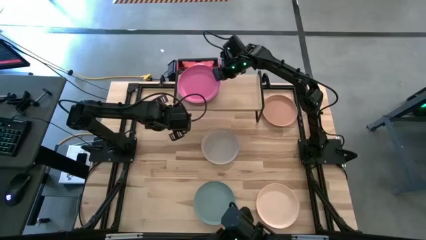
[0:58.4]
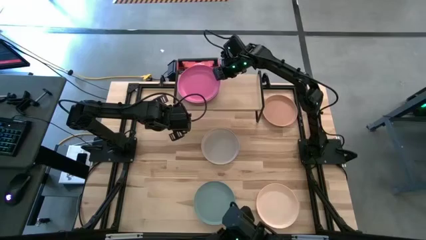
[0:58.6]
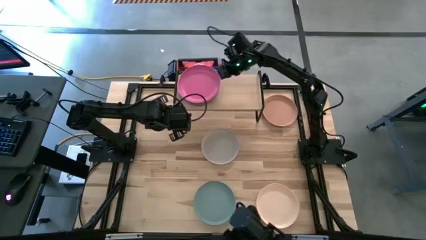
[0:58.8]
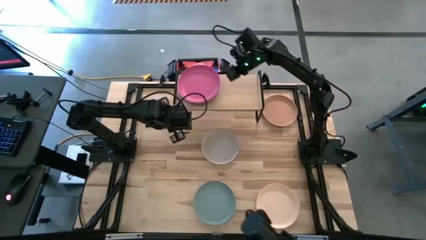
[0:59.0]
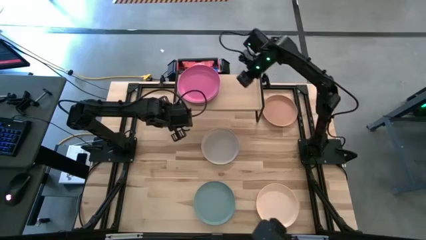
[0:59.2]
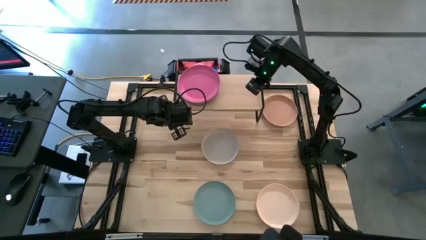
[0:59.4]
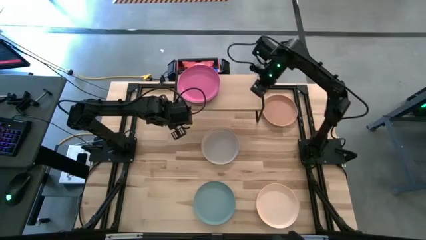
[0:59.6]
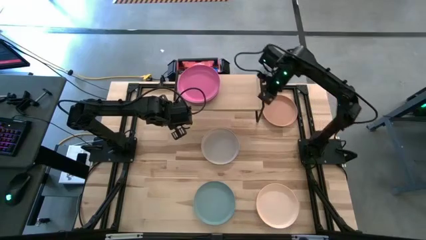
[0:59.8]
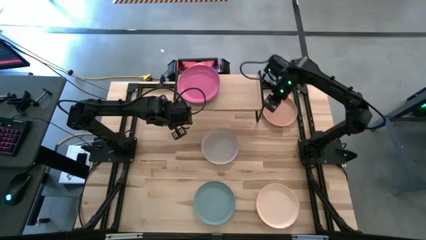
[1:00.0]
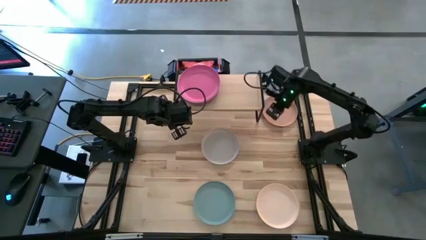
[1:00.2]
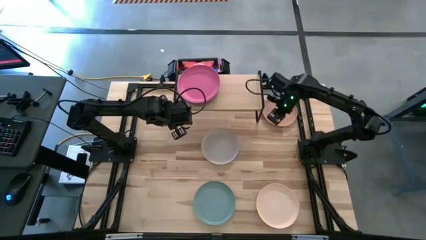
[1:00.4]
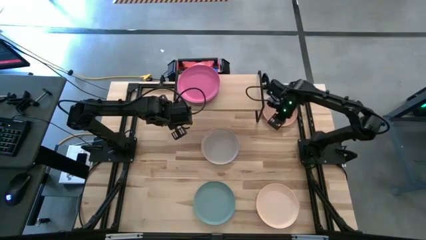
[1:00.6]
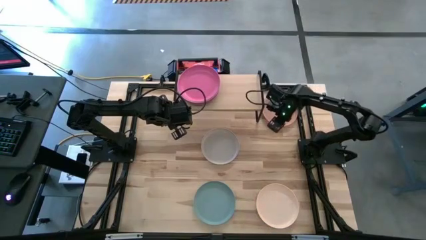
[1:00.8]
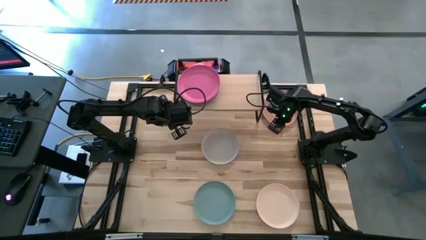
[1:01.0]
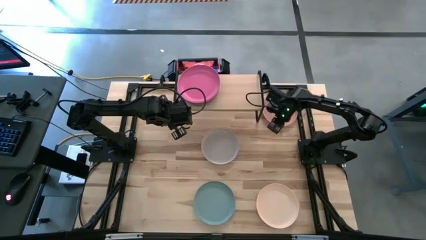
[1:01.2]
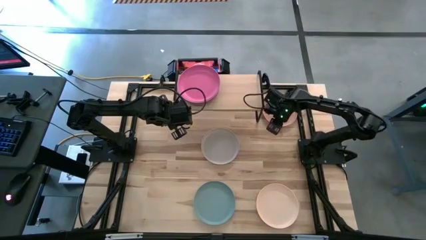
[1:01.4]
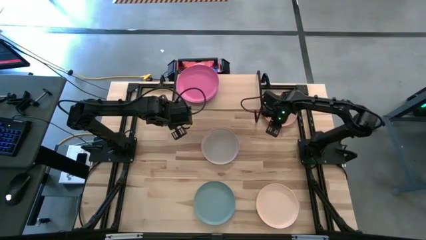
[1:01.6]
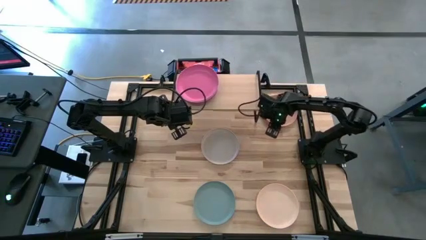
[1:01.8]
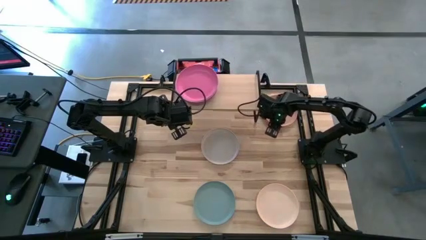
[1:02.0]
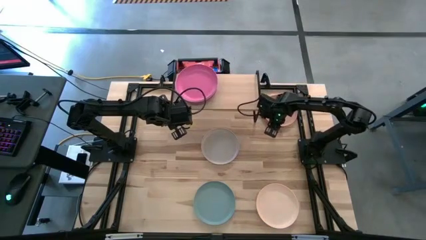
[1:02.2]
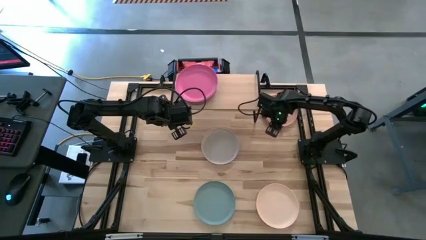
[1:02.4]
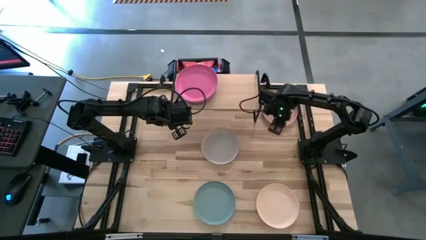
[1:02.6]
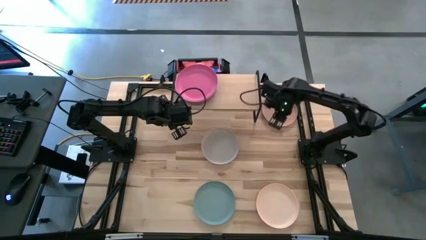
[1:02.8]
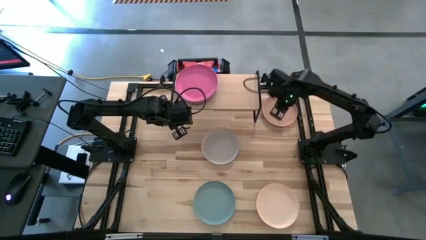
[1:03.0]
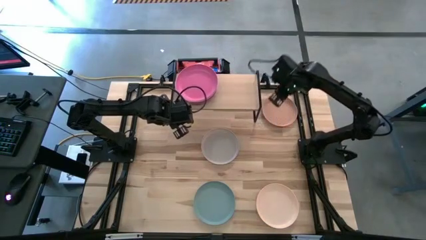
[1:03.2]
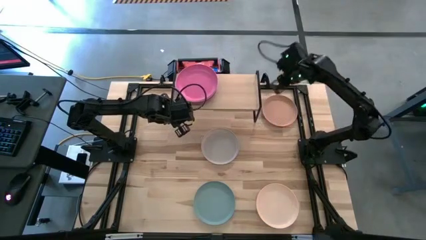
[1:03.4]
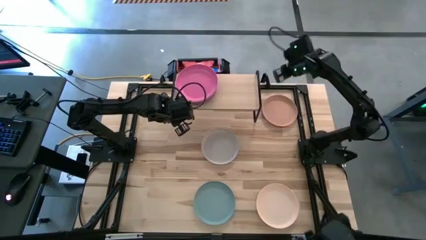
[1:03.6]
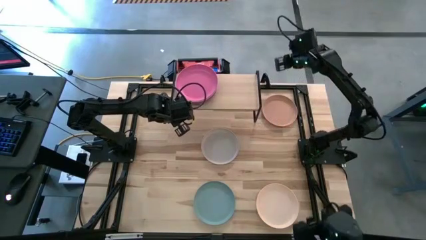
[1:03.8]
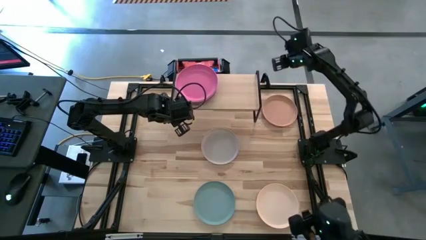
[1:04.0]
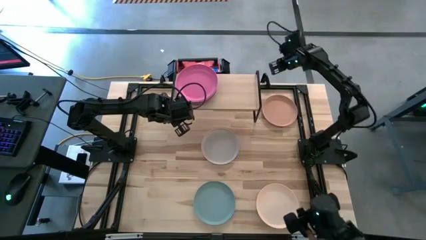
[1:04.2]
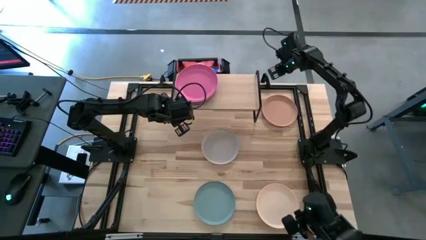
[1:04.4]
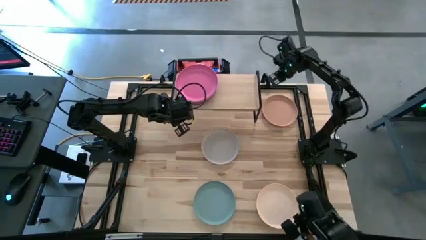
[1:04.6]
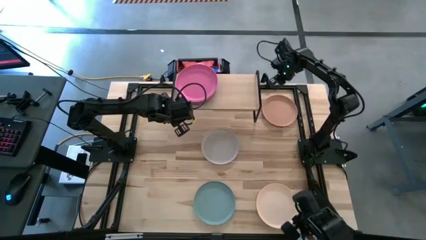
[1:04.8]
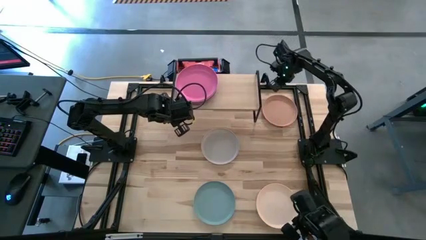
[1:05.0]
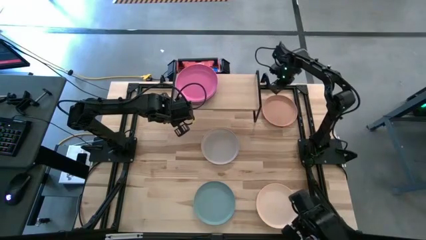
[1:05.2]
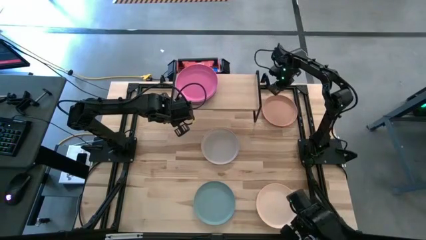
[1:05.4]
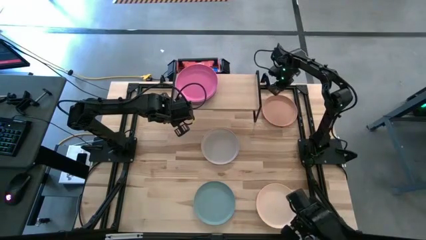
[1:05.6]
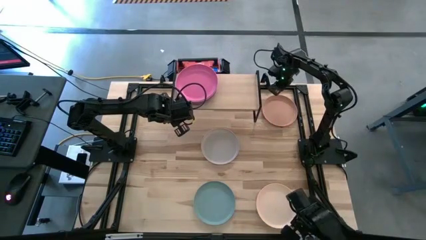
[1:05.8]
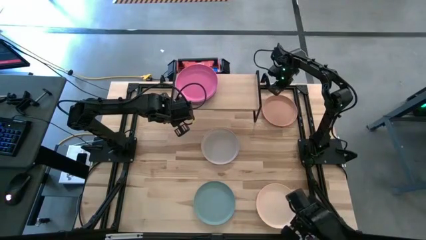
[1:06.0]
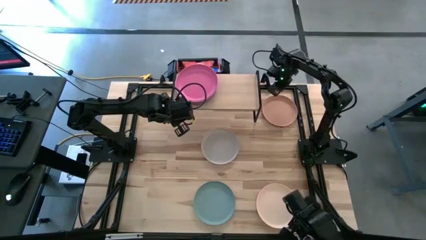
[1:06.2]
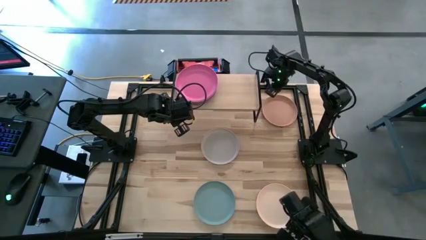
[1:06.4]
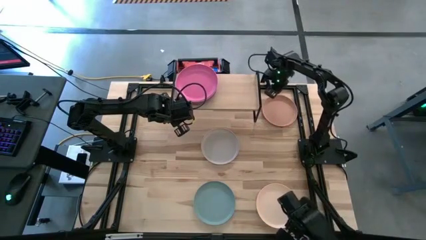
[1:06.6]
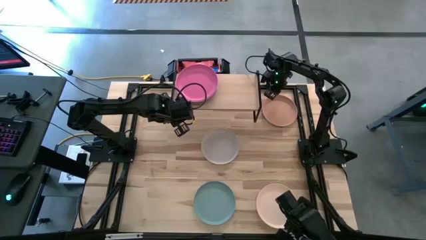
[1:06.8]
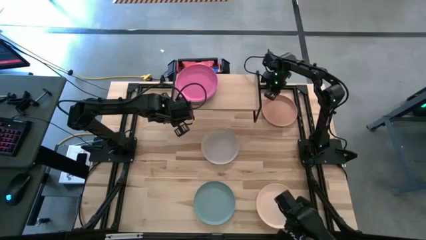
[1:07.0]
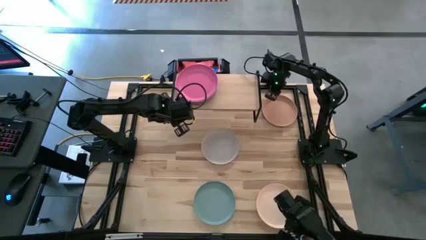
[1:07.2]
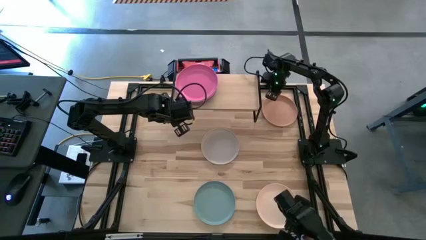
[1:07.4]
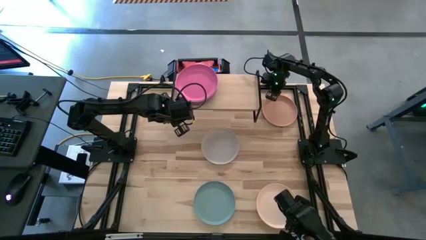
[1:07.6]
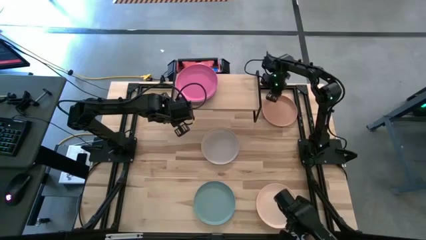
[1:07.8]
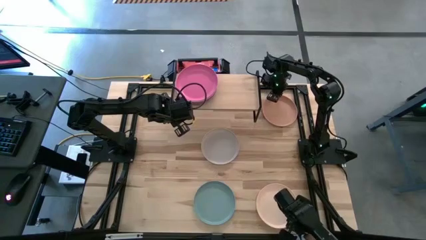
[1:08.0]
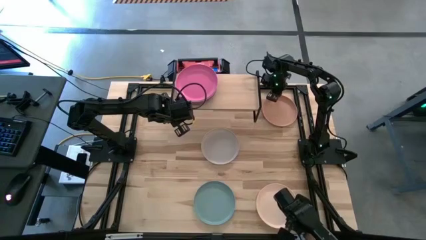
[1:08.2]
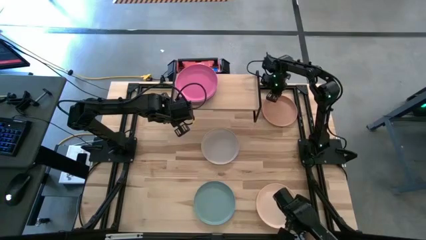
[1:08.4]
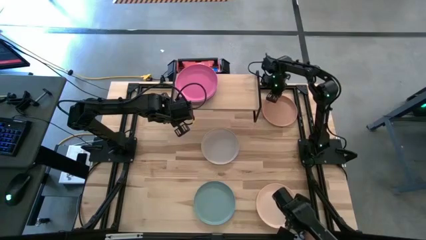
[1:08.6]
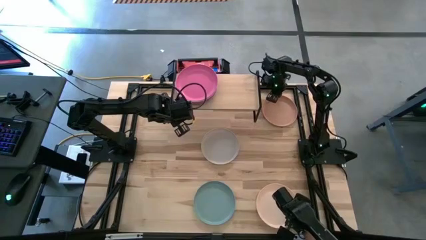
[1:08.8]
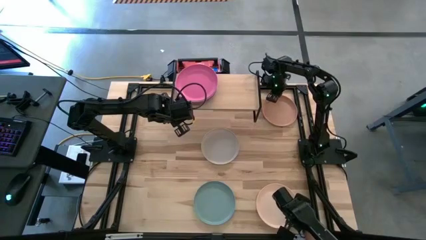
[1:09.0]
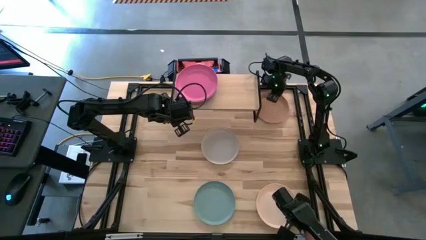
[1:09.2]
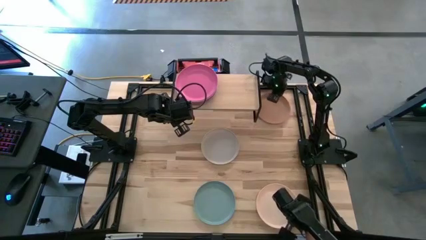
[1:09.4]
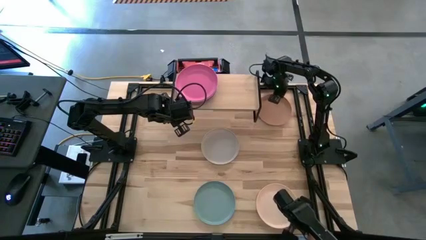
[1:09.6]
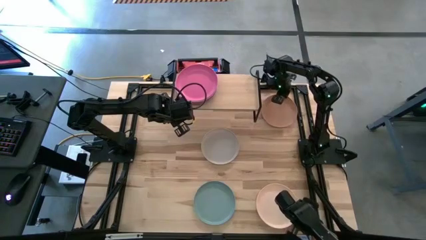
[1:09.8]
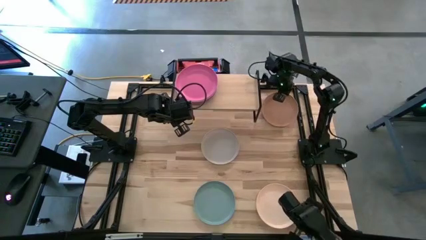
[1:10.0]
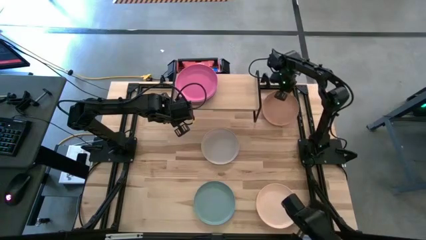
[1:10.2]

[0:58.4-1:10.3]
Task: Place and stack plates onto a shelf
Put the brown plate on the shelf
